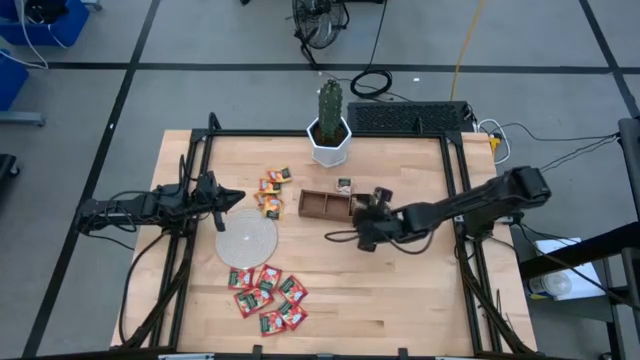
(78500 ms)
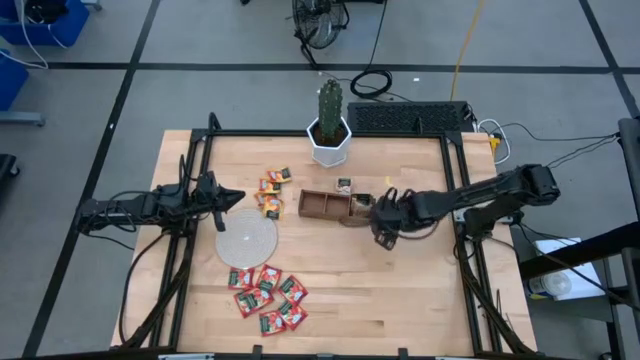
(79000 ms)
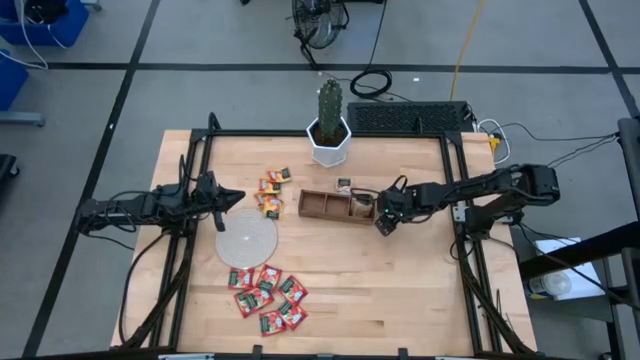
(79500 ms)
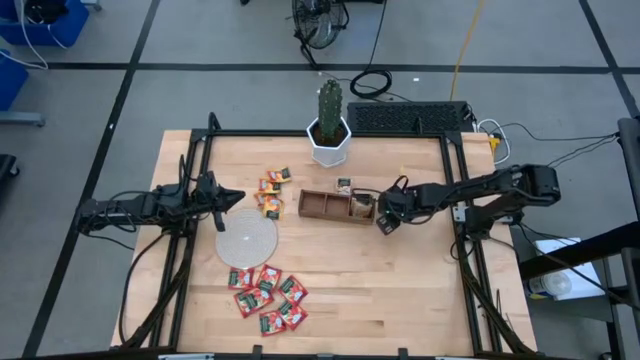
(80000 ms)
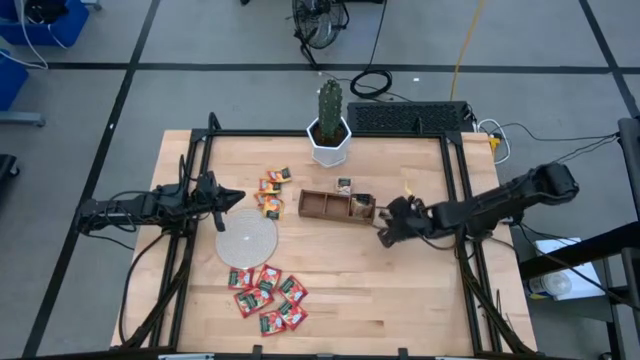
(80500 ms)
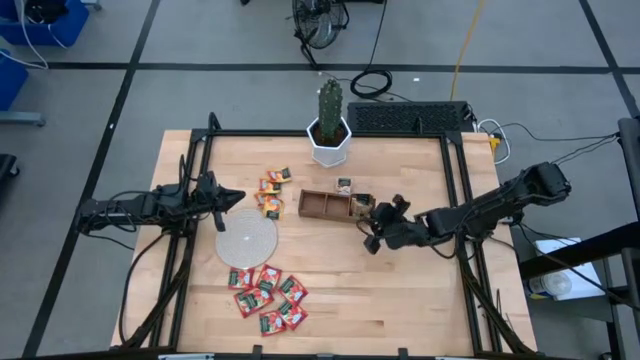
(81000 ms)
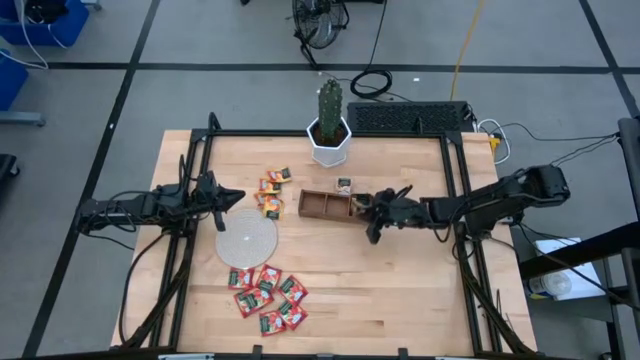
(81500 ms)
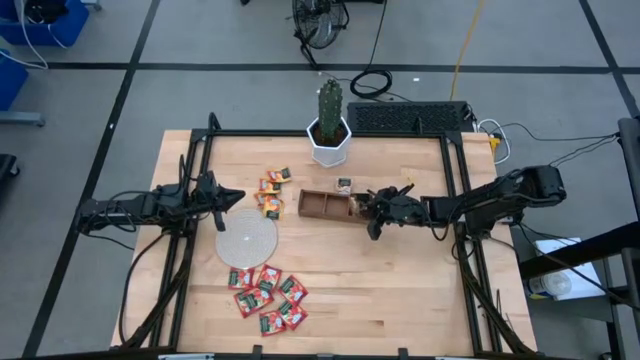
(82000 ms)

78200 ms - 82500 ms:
Task: Pick & Place Tea
Put the brown tea bag into the right section of the wooden organizer

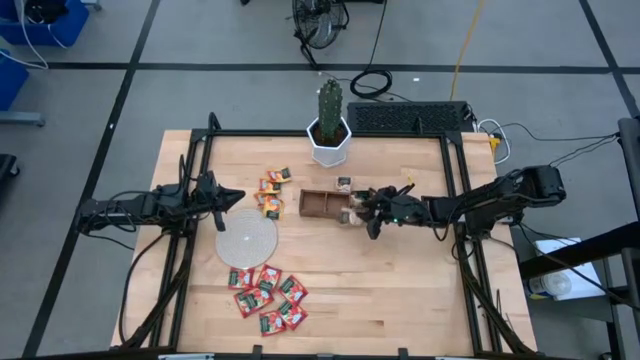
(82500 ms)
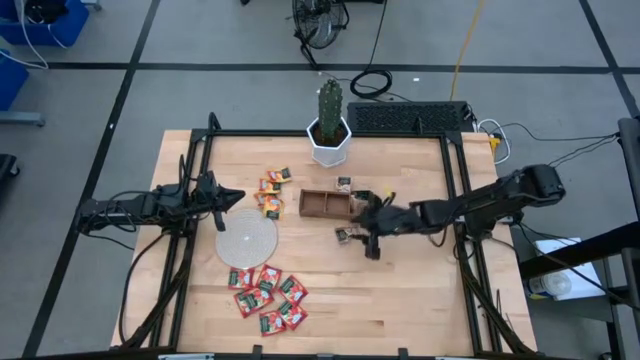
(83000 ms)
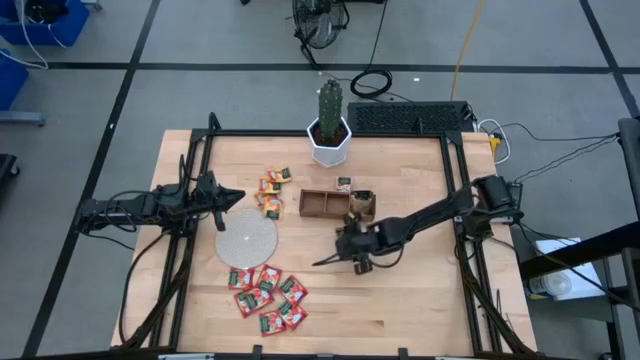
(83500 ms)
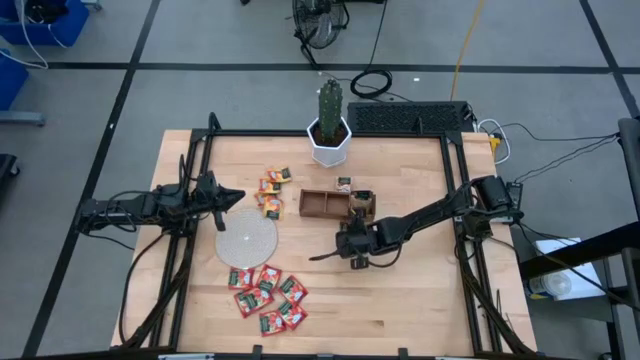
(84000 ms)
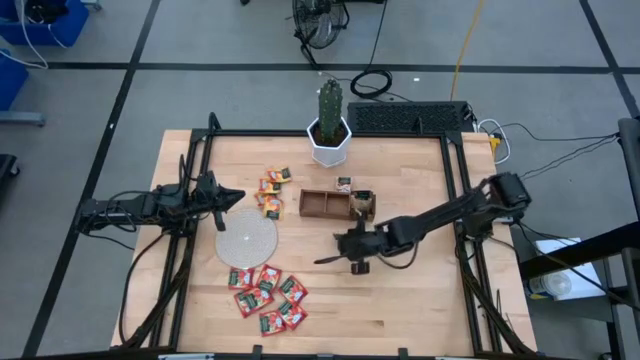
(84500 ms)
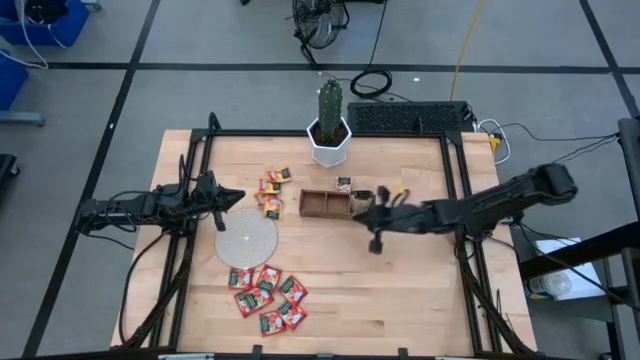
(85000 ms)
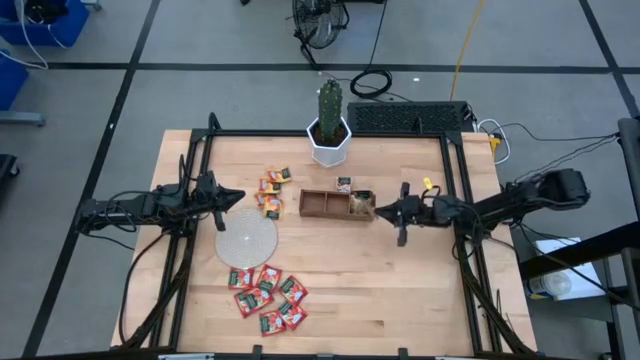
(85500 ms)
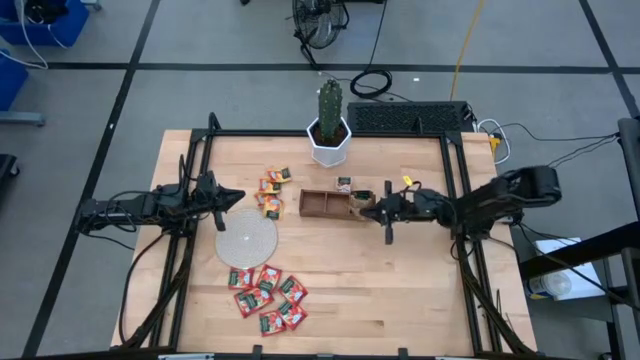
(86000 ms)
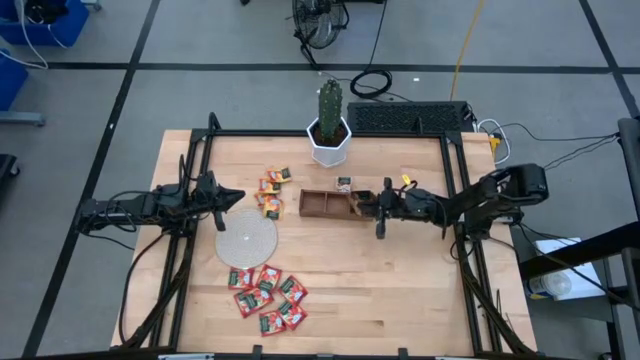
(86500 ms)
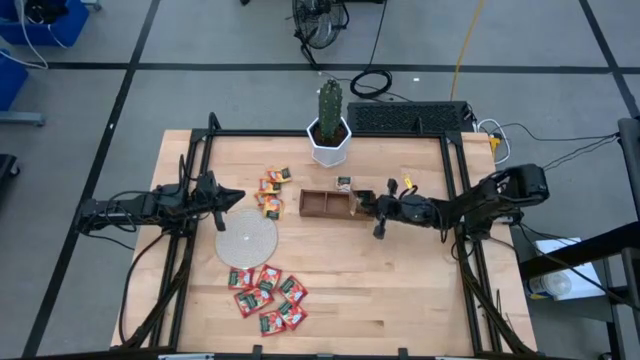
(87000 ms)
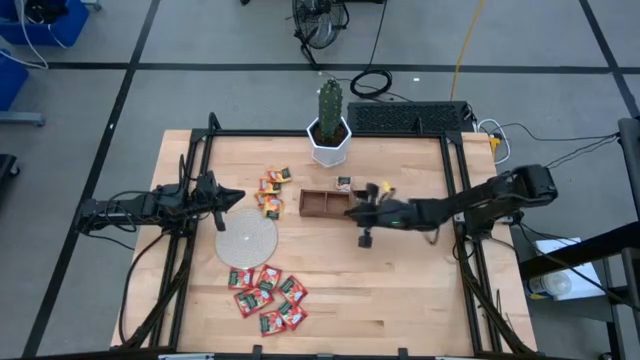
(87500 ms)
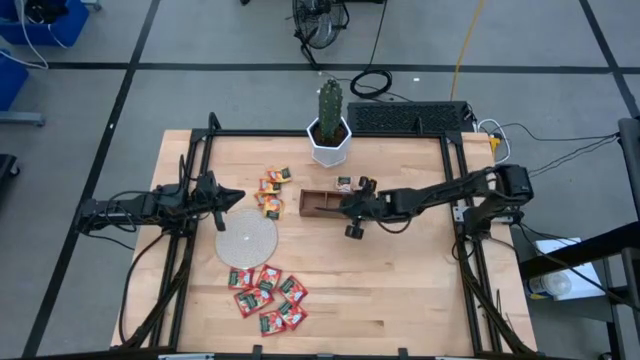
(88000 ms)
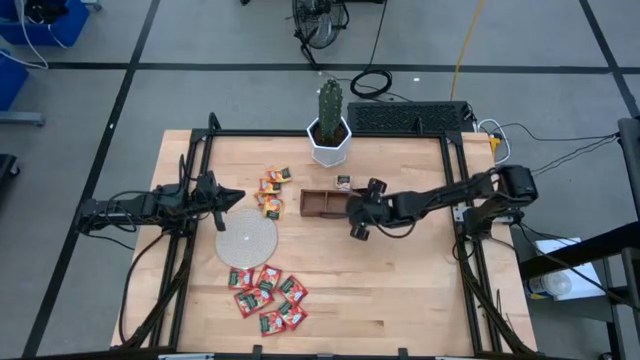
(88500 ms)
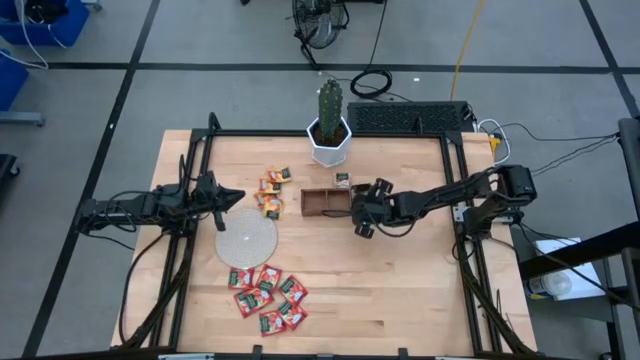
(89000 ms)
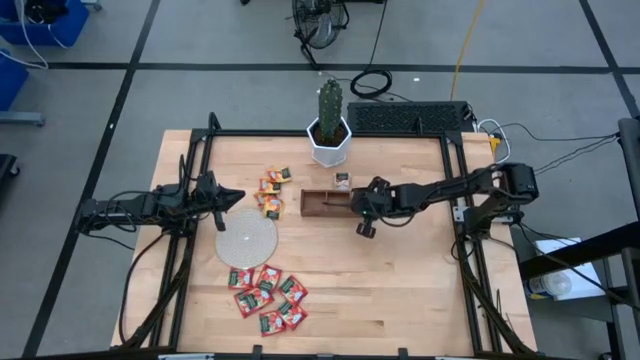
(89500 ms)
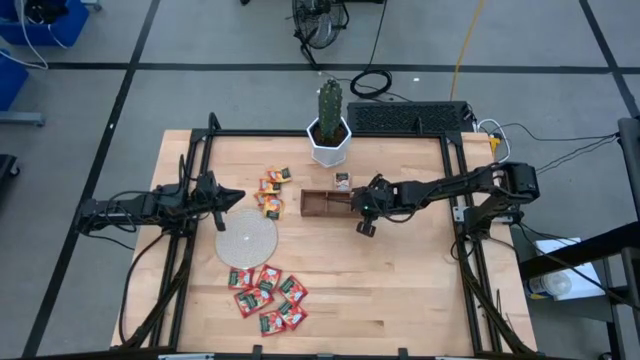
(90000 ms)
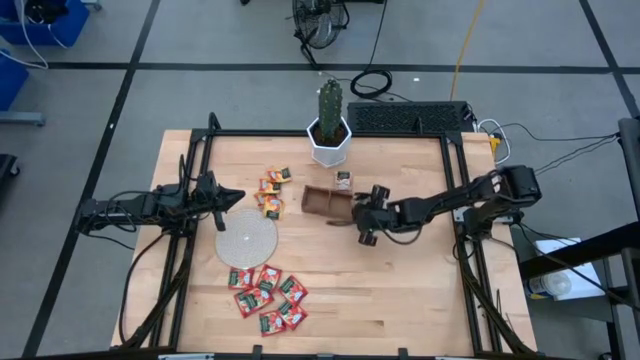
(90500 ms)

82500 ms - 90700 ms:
Put the brown tea bag into the right section of the wooden organizer

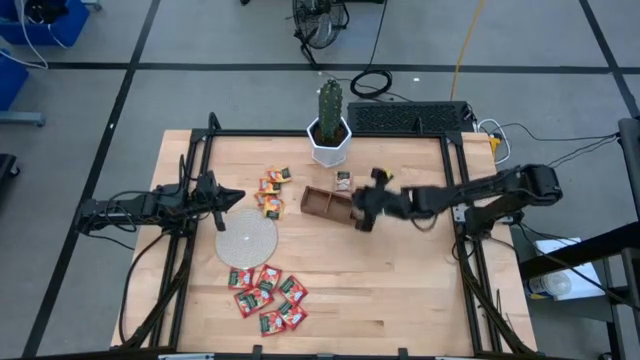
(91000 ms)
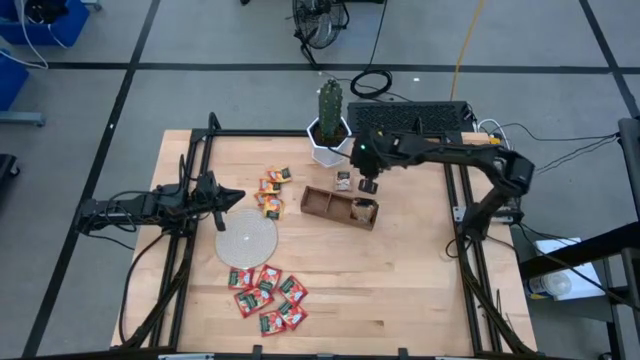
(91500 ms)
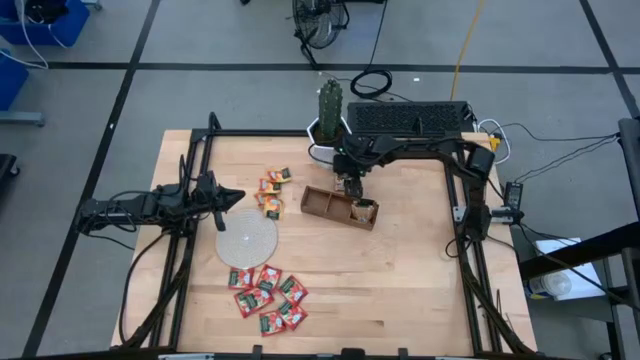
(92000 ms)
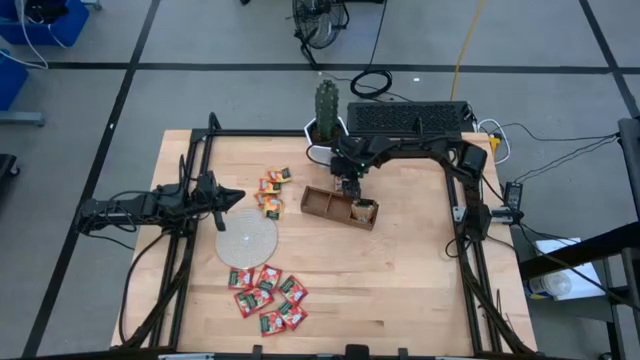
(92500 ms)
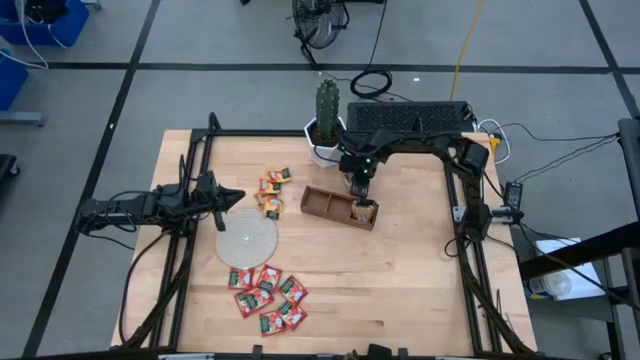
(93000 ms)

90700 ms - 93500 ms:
Put the brown tea bag into the right section of the wooden organizer

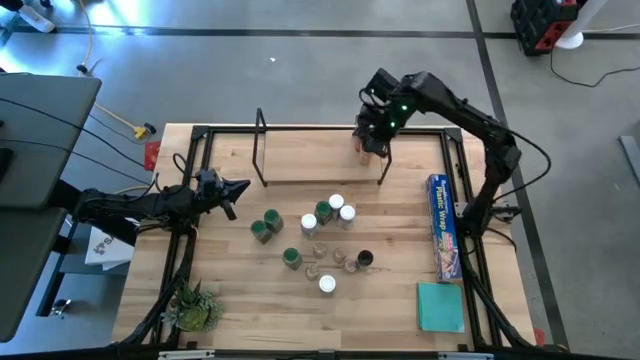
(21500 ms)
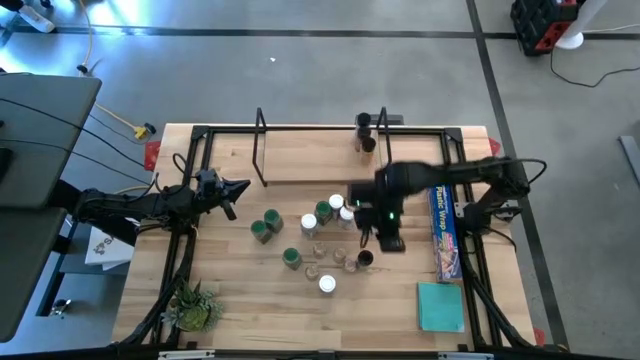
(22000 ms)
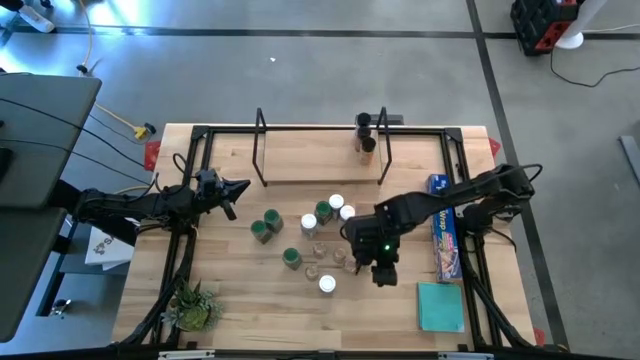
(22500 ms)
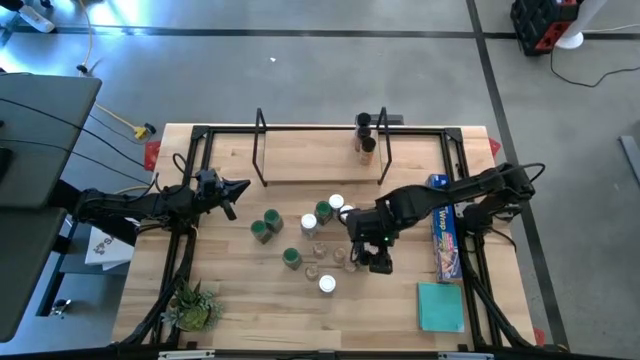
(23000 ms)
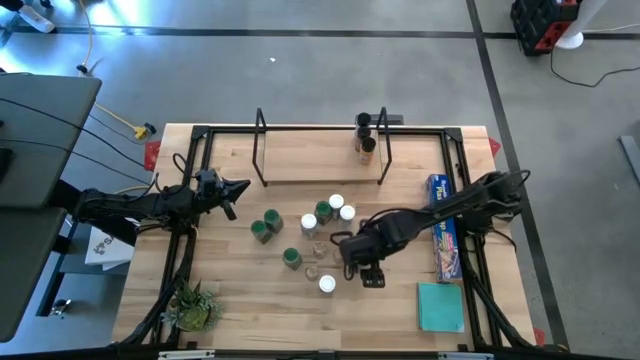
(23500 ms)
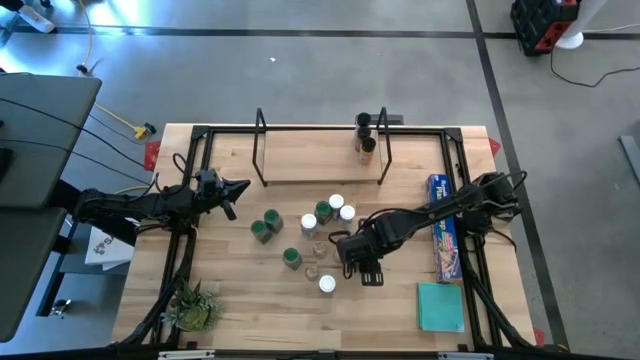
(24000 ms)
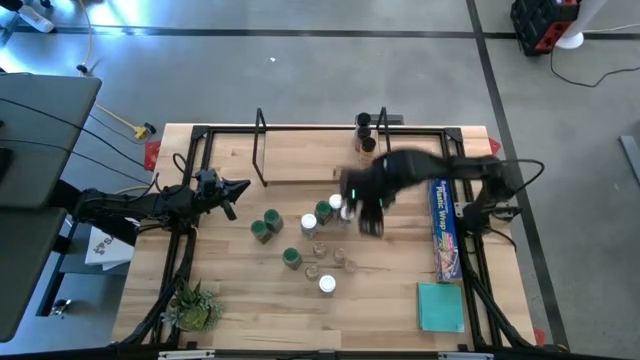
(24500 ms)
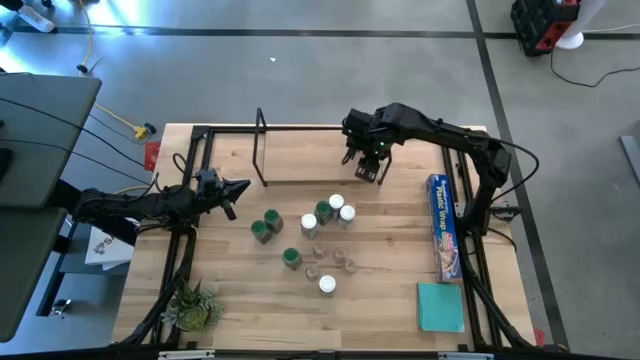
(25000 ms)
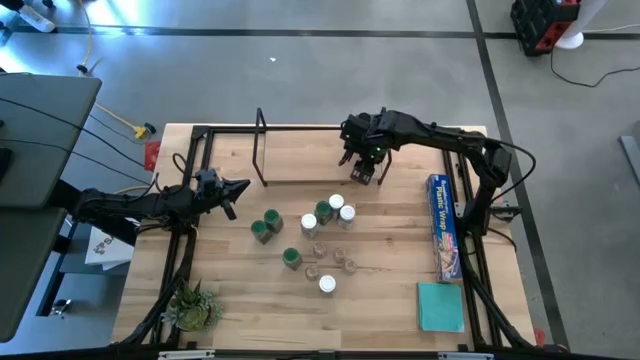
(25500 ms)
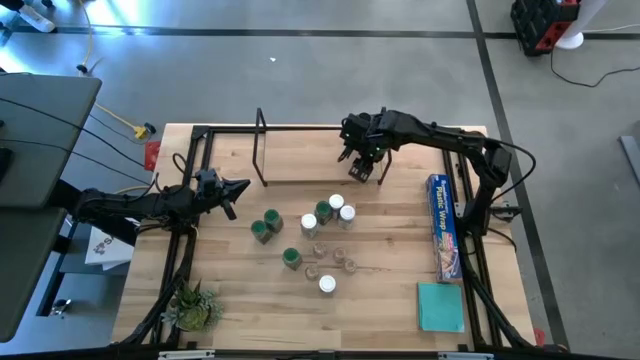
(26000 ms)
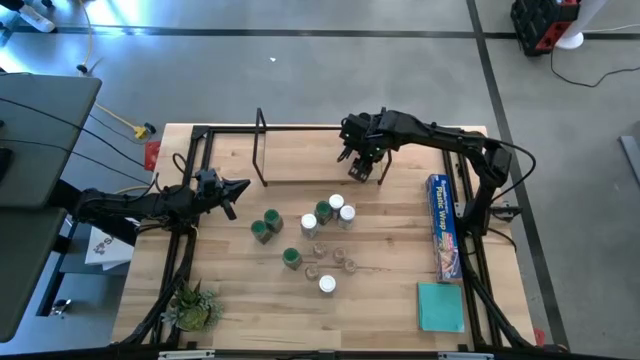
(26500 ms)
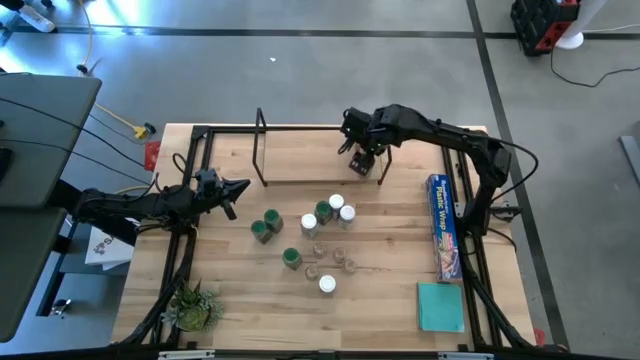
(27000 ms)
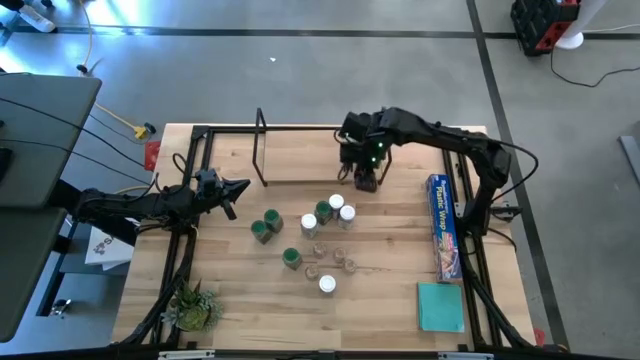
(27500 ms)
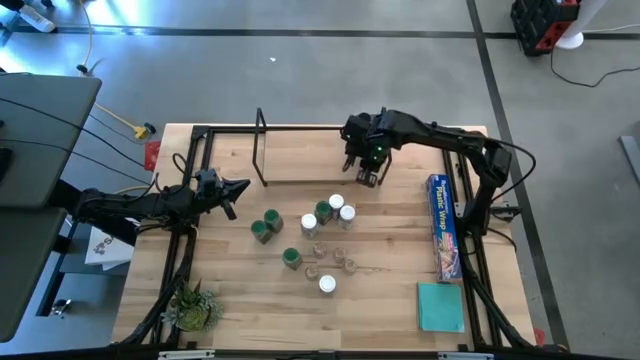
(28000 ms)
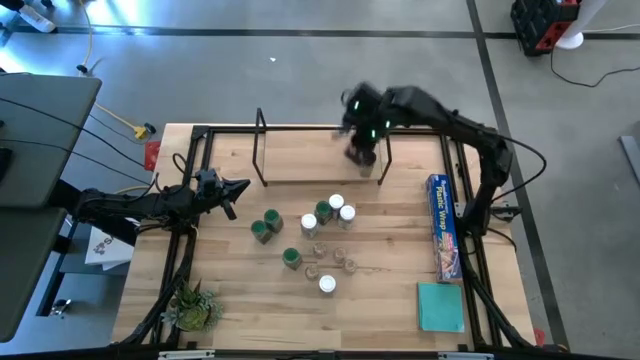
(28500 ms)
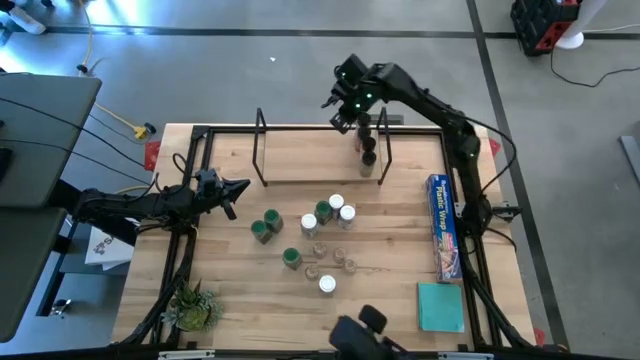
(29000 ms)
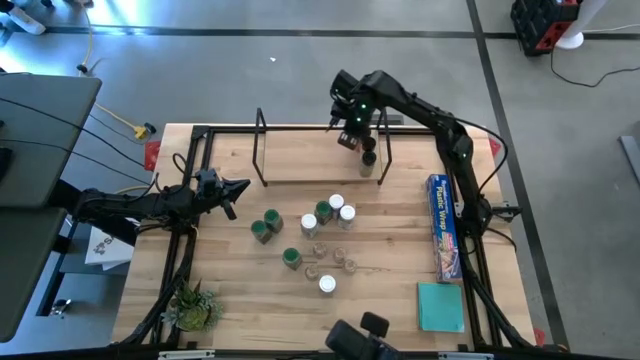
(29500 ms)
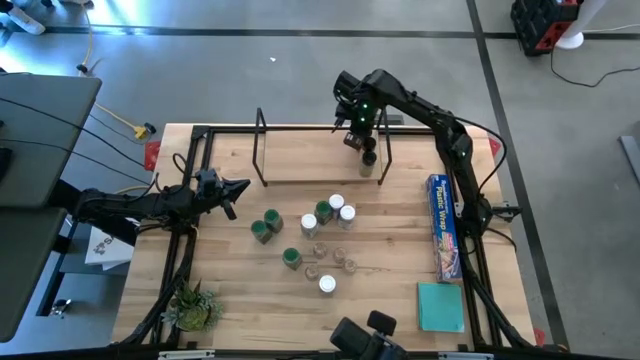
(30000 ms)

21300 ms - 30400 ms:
Task: Shelf spices
Put the blue seasoning bottle on the shelf
